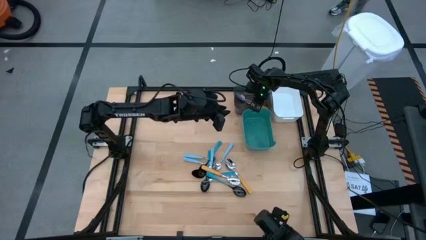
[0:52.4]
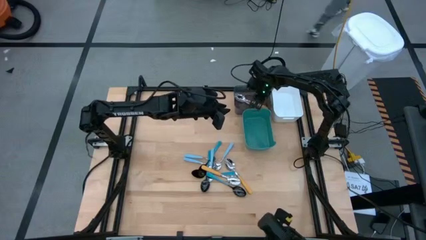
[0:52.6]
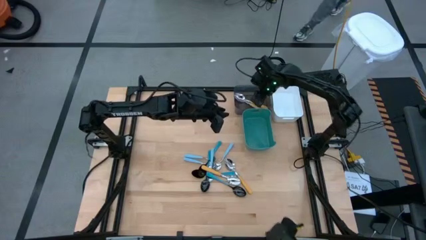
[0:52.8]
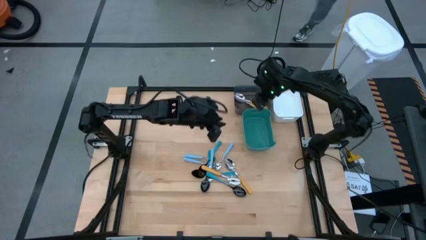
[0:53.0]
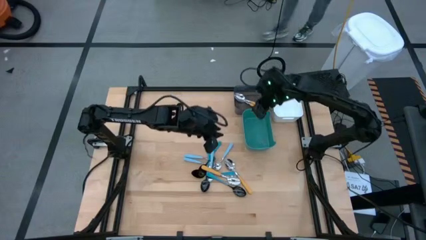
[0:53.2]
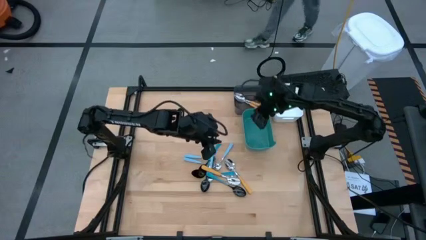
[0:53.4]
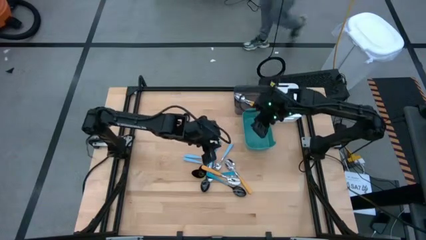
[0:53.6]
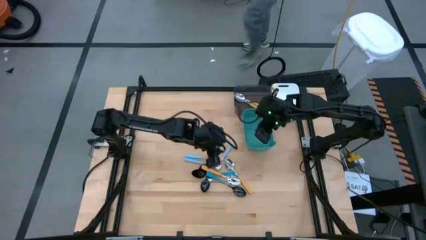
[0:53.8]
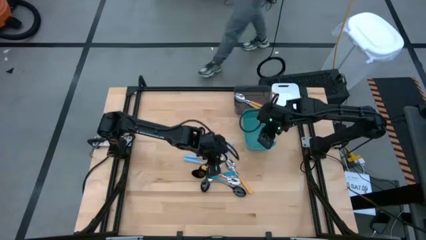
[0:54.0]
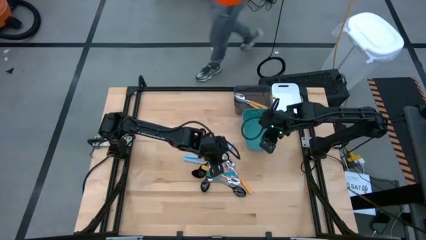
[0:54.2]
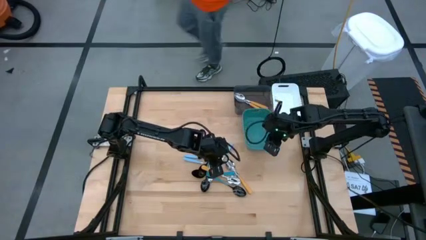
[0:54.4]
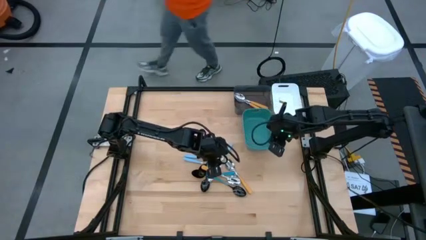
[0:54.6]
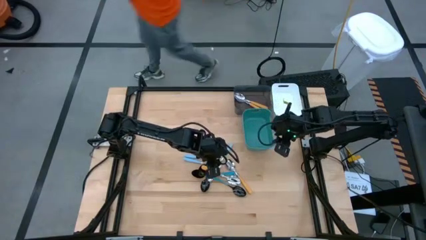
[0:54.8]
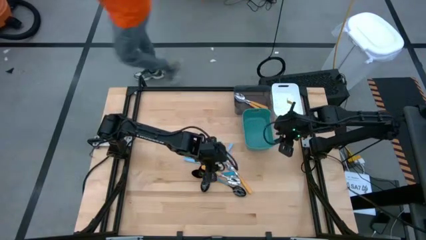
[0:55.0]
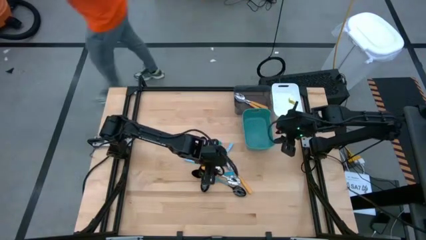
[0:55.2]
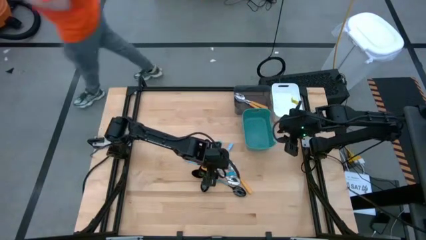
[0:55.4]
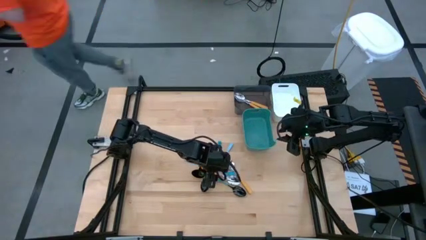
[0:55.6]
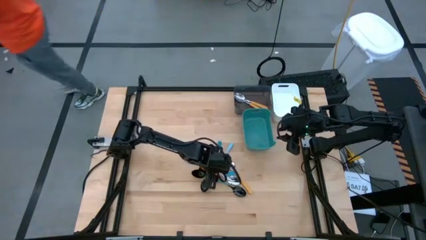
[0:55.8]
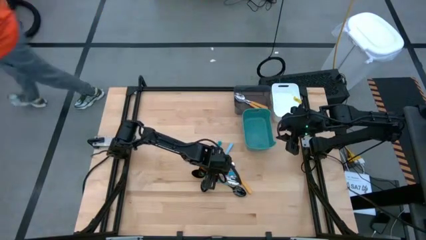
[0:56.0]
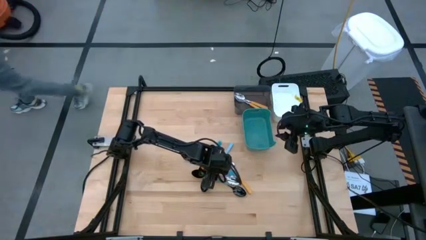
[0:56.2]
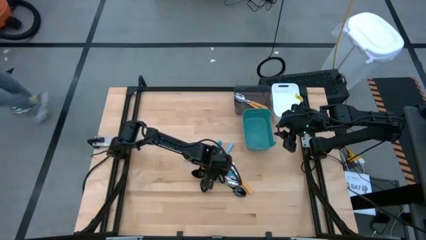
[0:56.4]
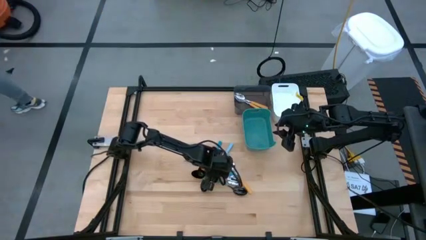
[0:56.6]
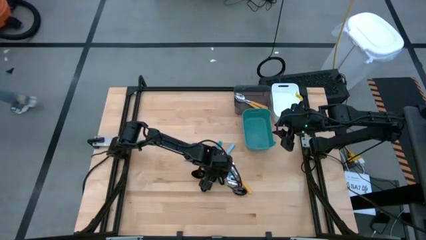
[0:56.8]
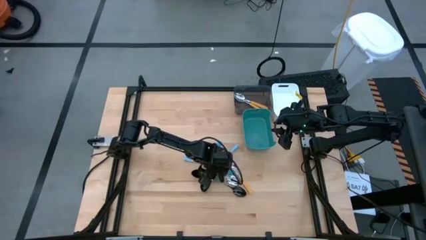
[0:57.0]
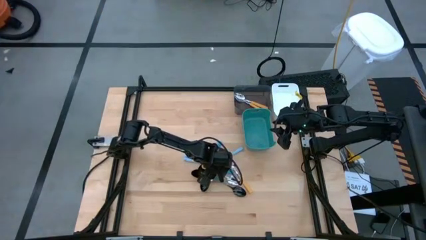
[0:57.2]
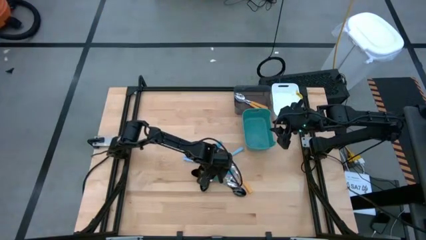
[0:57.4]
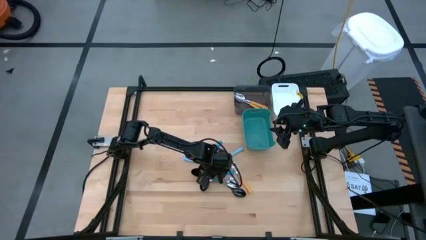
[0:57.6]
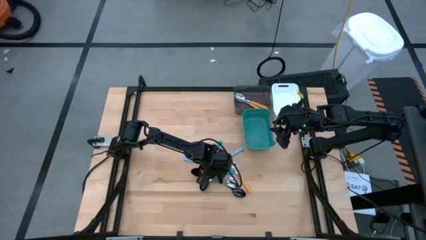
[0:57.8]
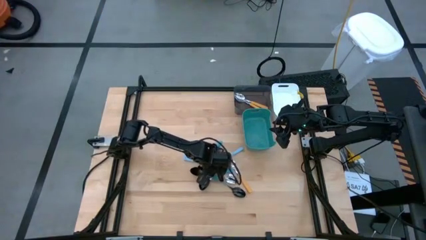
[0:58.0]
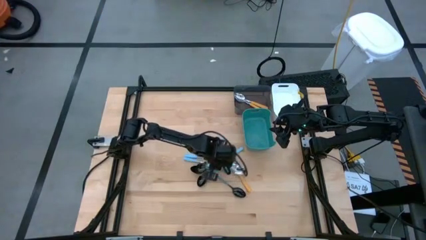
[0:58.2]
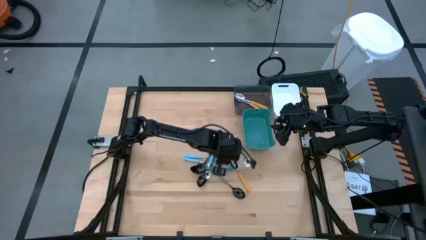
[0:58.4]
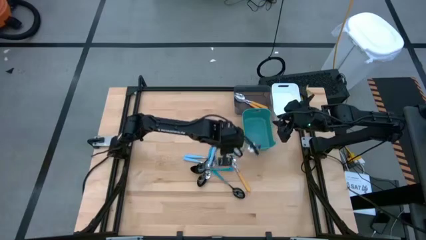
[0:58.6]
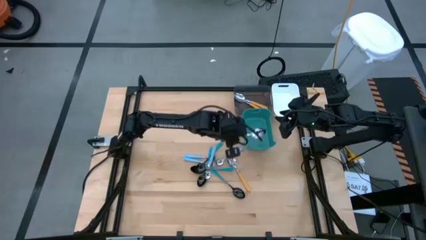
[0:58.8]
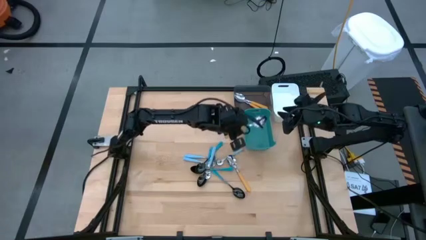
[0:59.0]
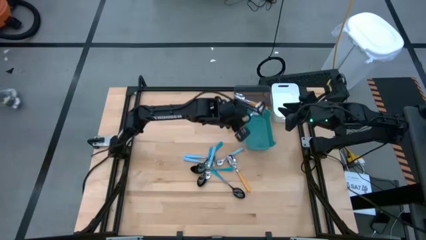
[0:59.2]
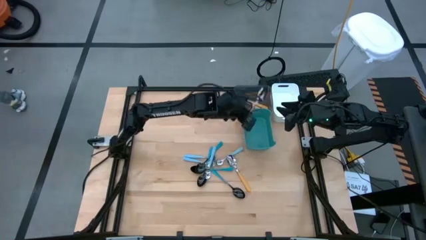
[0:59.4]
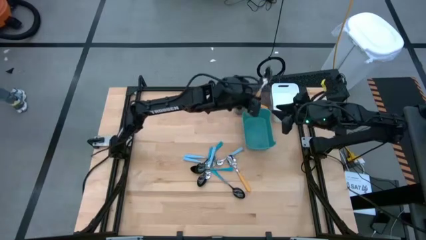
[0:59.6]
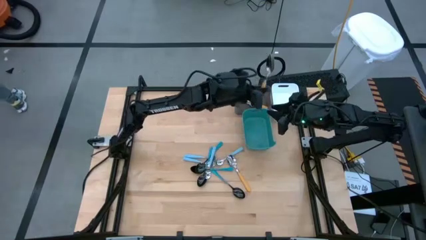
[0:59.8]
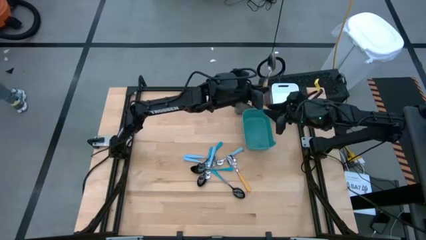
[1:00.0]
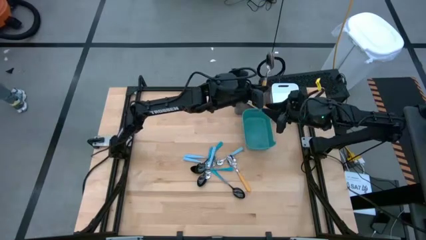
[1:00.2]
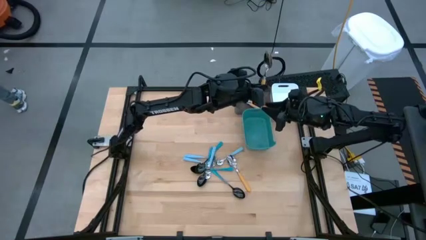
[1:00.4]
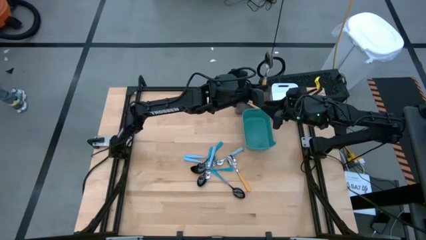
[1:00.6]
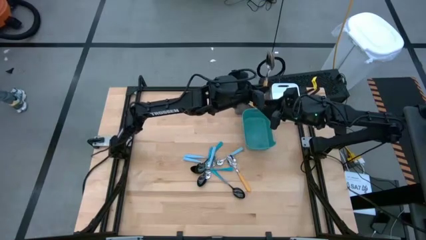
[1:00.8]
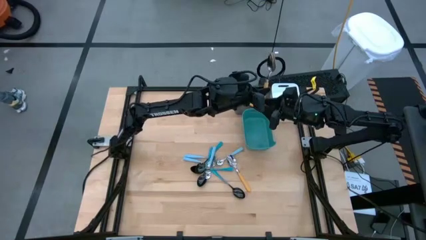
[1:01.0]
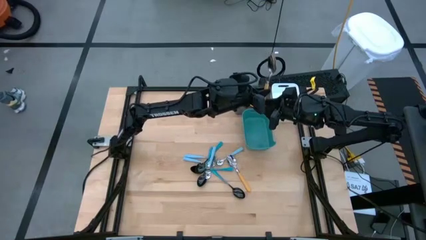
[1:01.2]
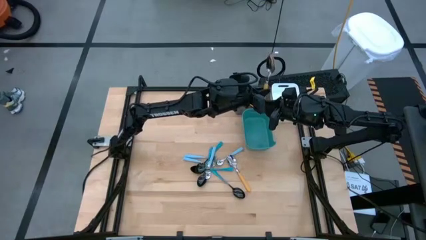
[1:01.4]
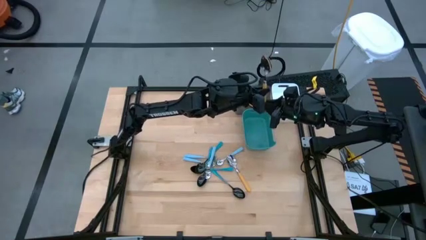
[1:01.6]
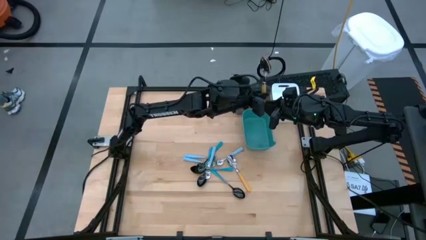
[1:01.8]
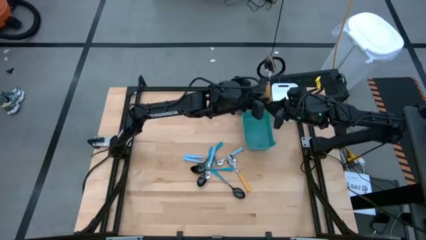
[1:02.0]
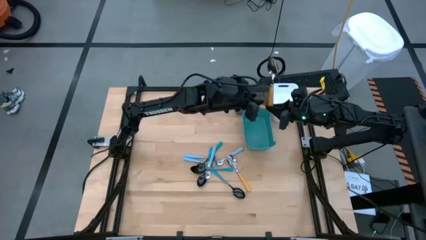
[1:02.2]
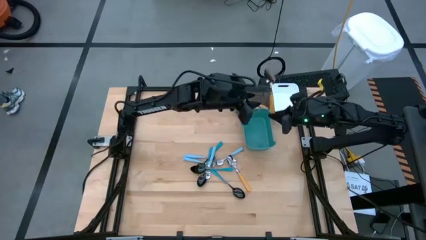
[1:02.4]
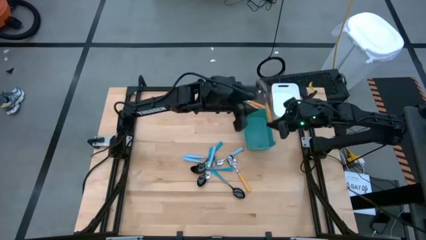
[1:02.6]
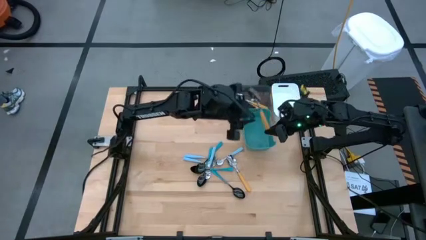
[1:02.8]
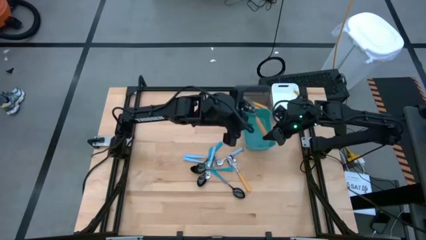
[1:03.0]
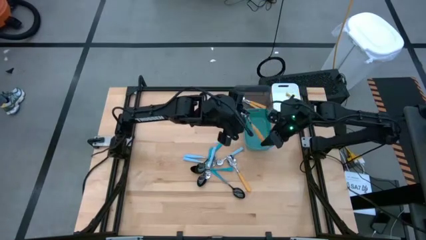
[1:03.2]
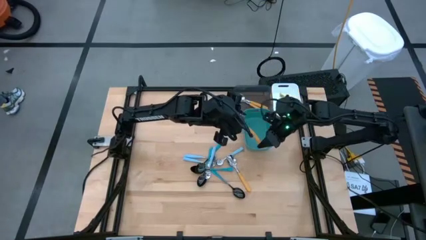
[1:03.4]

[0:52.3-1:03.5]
Task: Sort silverware by color (type)
Put the orange spoon into the black bin

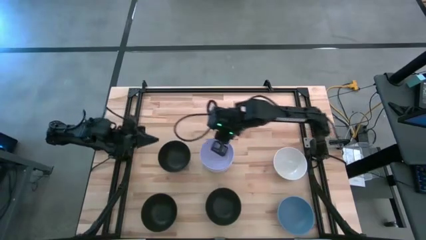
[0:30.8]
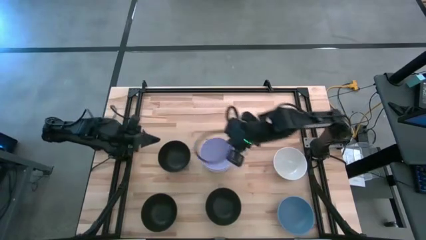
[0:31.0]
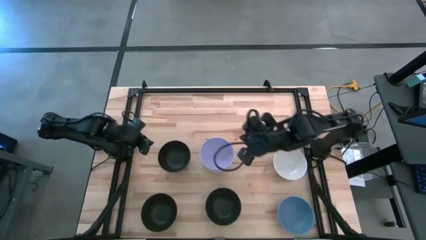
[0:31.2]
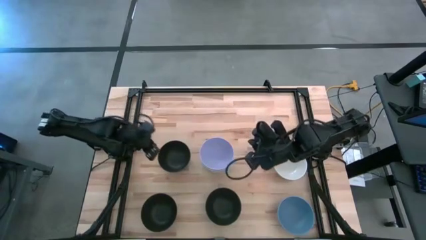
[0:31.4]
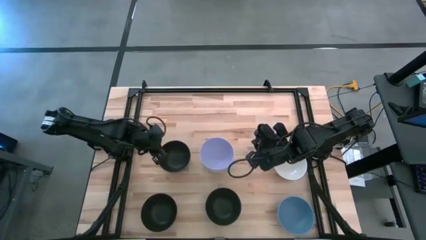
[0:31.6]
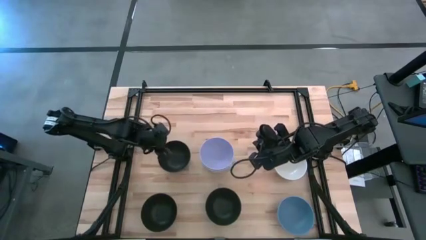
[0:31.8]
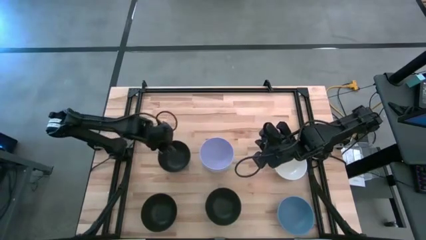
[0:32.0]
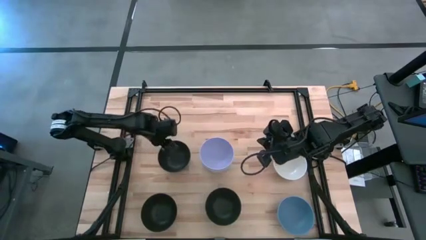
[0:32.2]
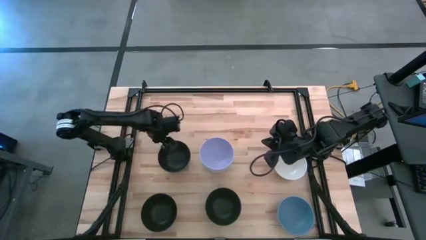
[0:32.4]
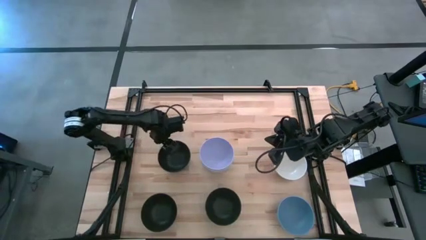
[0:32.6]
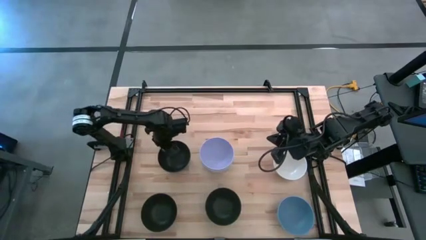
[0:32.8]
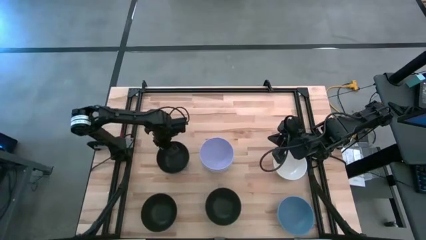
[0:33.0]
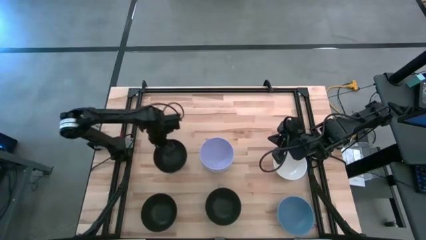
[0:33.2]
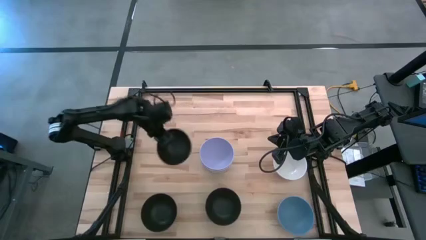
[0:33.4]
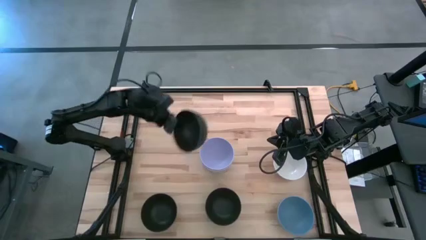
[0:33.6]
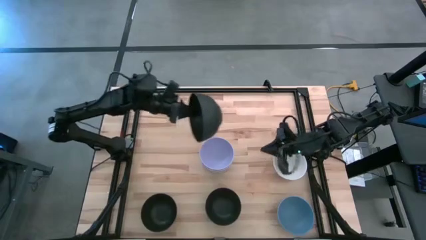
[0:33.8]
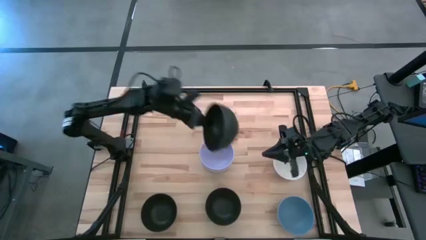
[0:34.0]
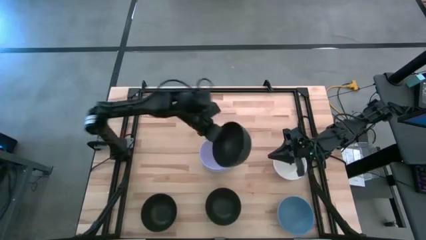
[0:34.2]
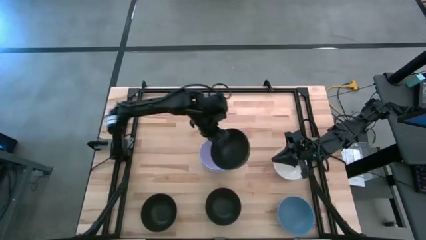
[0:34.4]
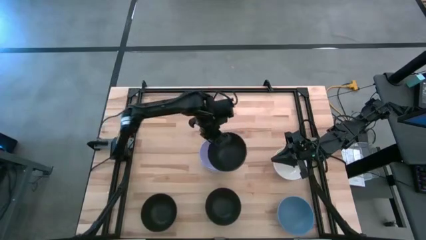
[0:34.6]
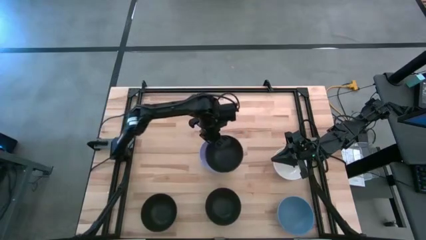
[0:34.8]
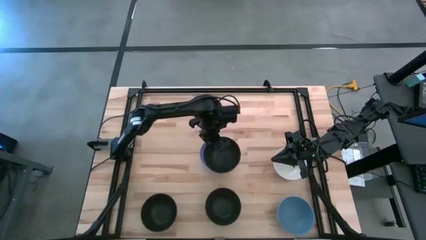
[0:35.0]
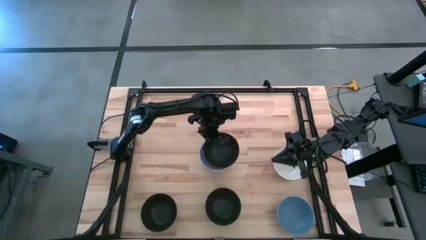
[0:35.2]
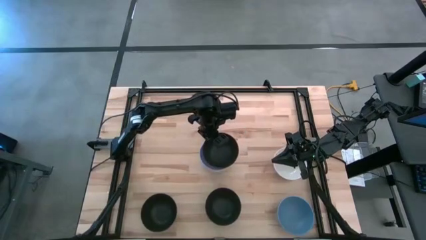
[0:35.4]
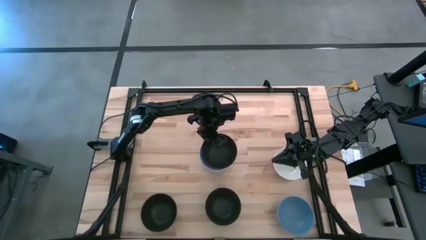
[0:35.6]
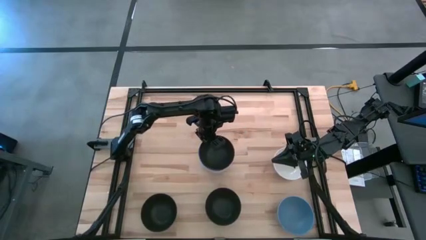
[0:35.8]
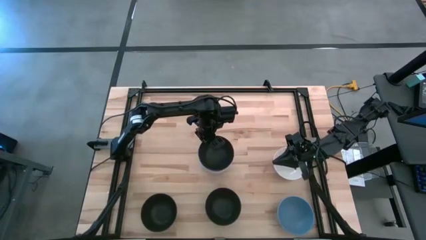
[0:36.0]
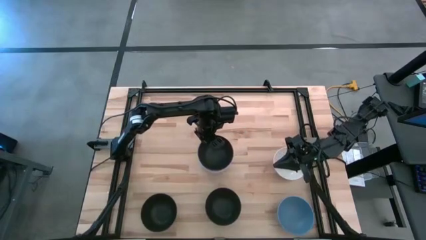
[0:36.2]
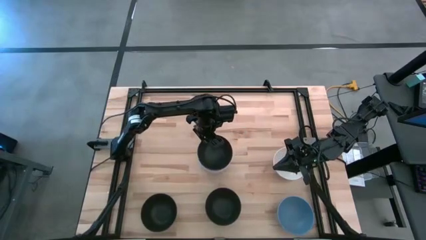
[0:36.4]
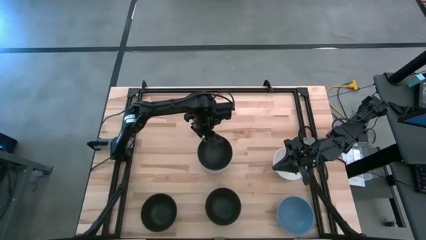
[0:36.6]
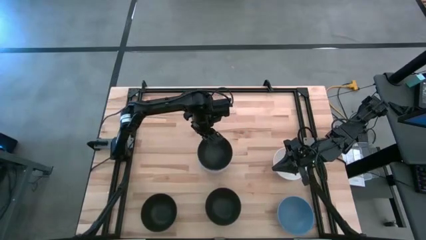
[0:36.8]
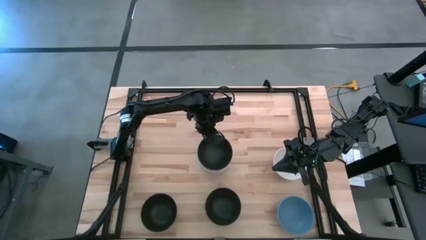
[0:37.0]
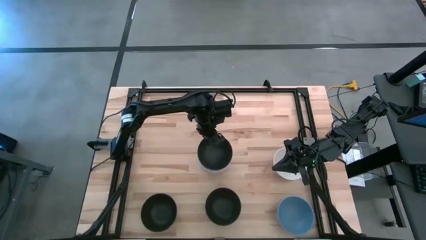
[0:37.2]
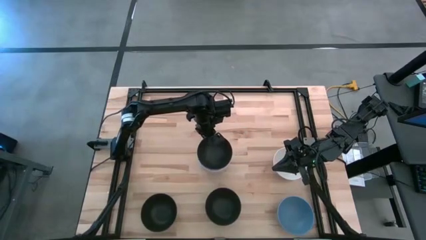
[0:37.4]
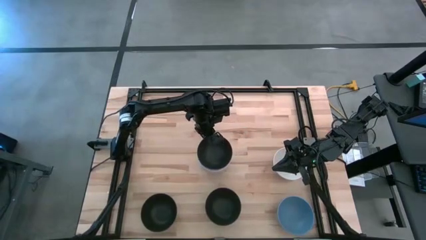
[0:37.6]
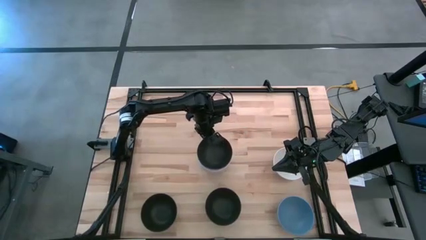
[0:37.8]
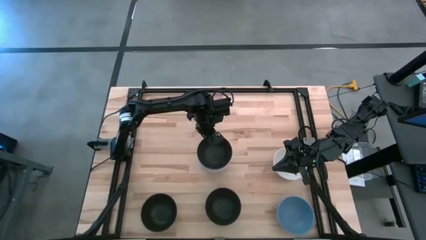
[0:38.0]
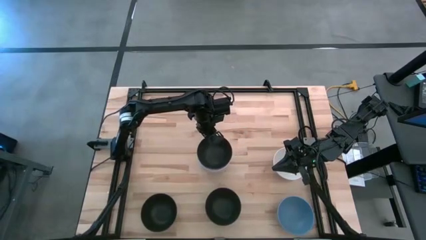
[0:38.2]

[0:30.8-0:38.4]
Task: Nest bowls inside each other
Stack the top left black bowl on top of the purple bowl
